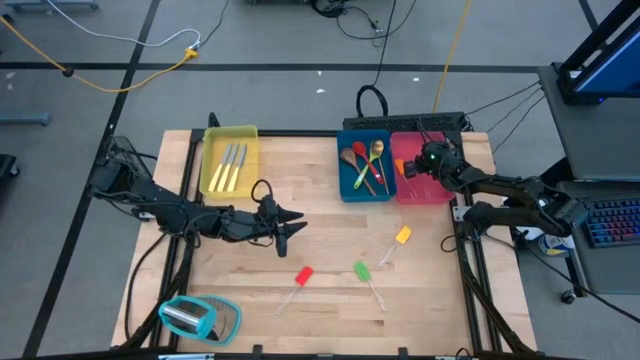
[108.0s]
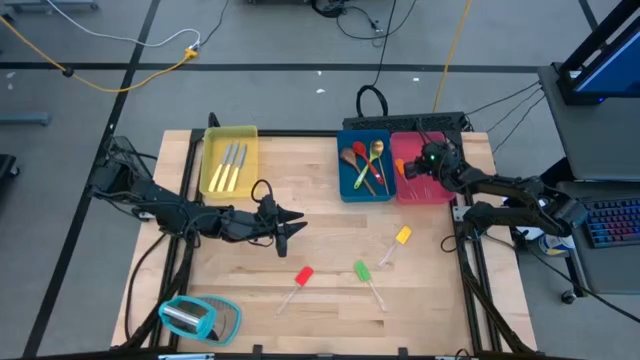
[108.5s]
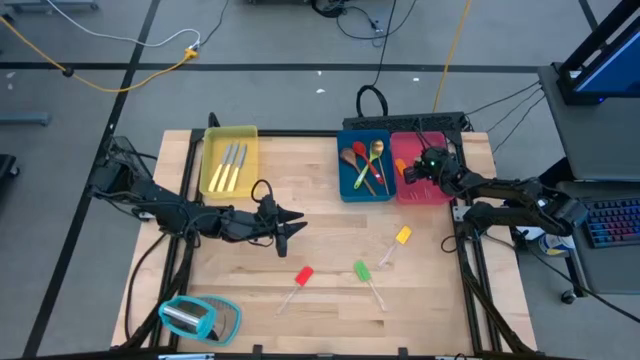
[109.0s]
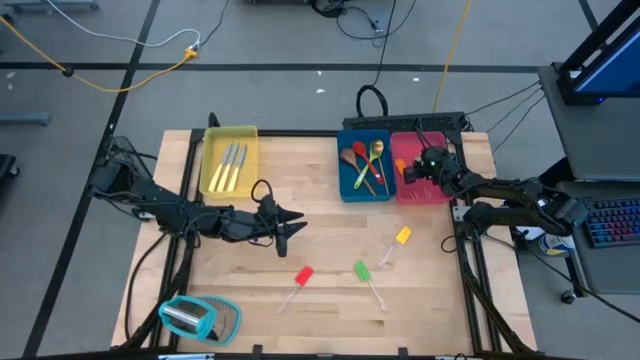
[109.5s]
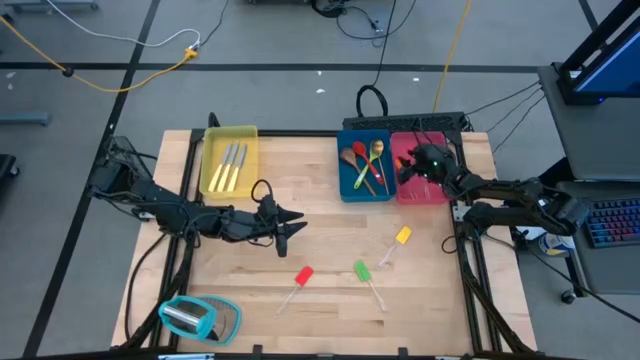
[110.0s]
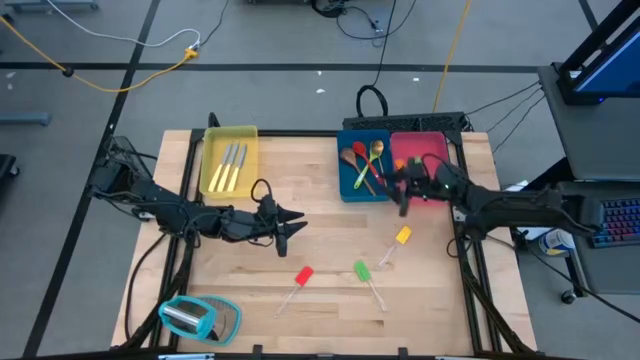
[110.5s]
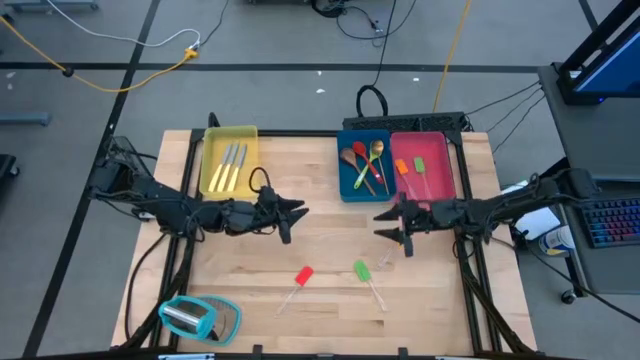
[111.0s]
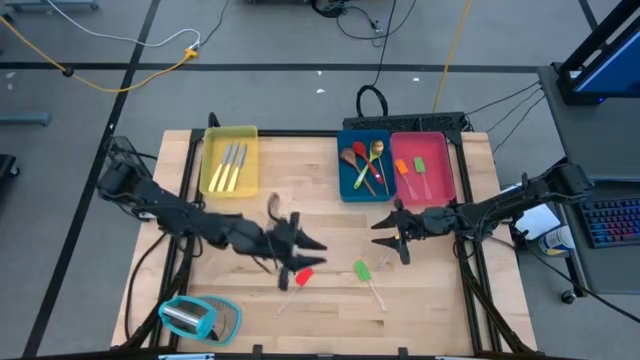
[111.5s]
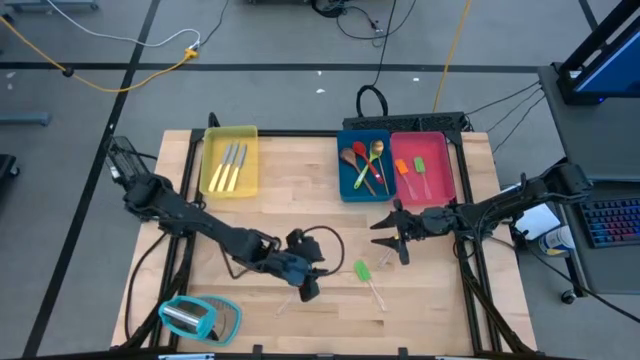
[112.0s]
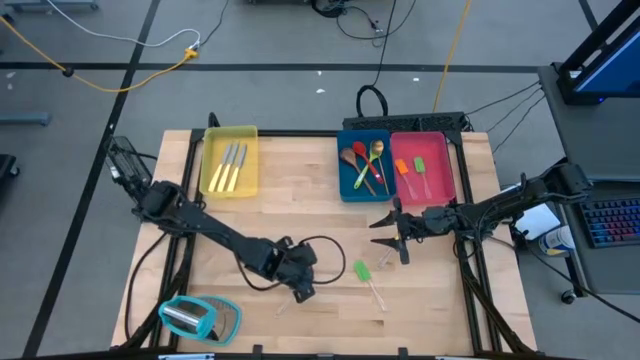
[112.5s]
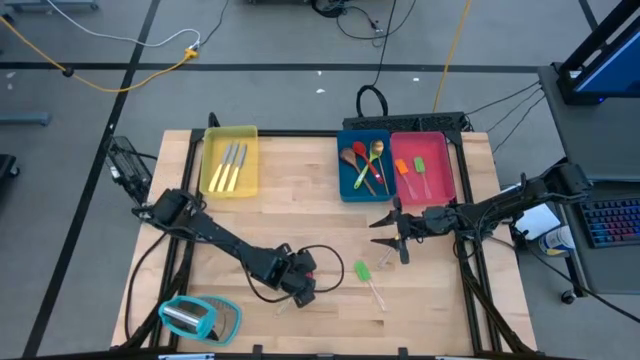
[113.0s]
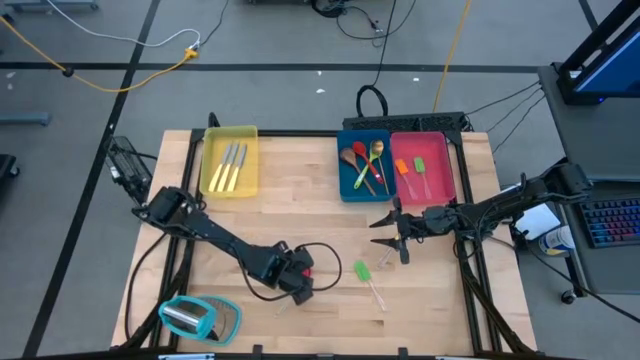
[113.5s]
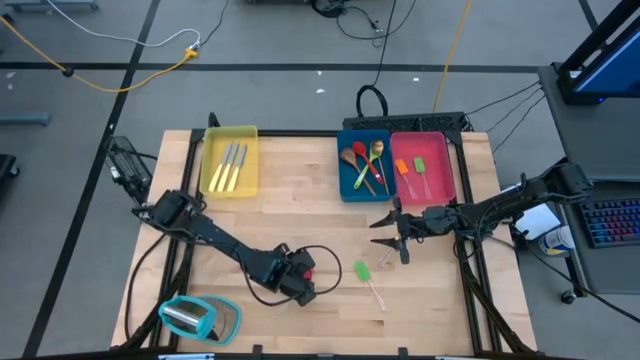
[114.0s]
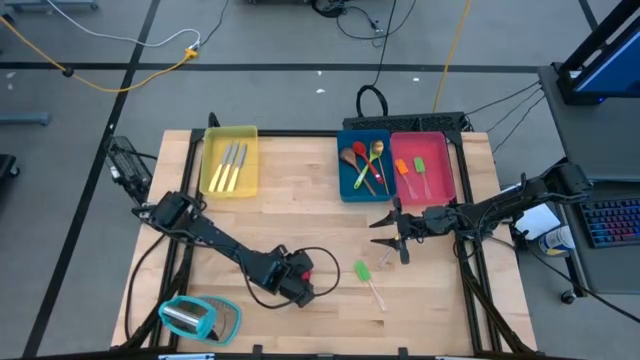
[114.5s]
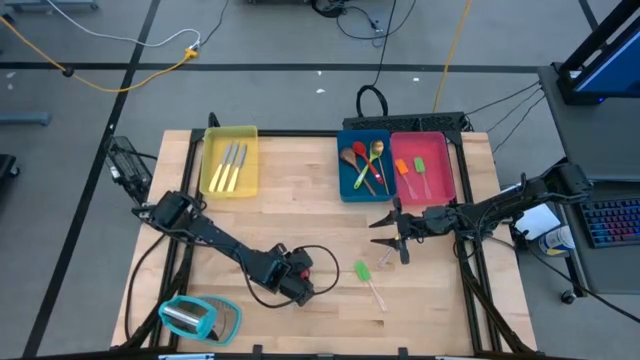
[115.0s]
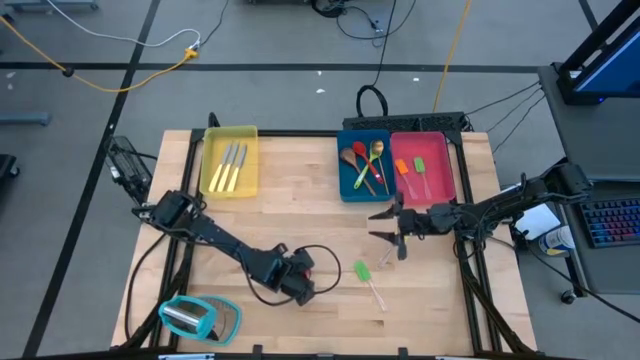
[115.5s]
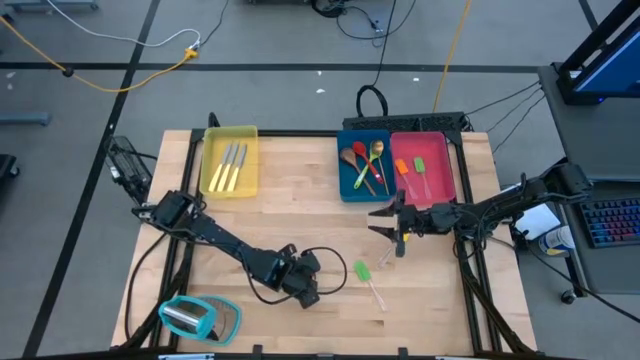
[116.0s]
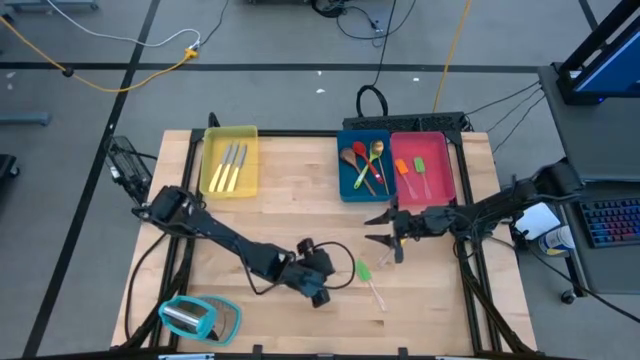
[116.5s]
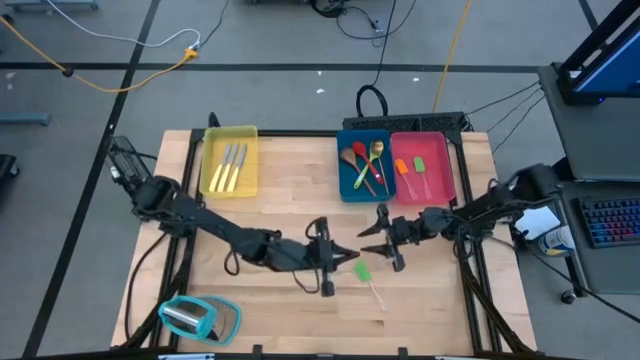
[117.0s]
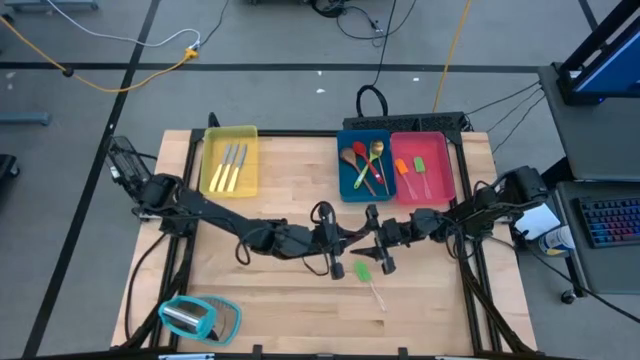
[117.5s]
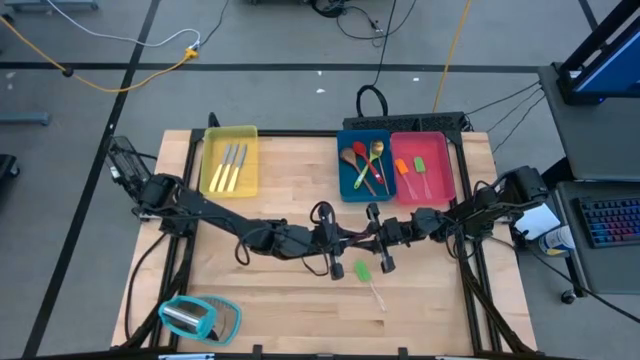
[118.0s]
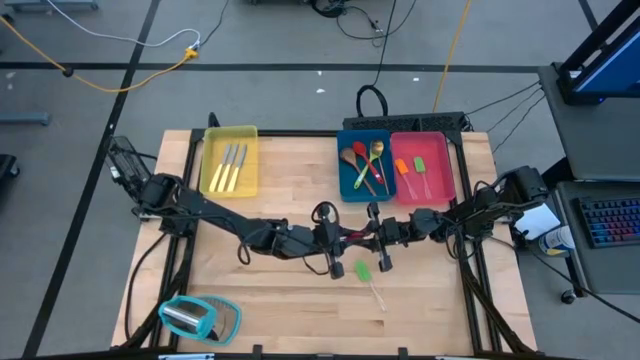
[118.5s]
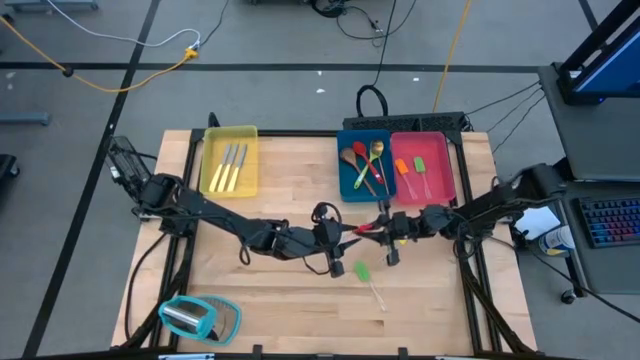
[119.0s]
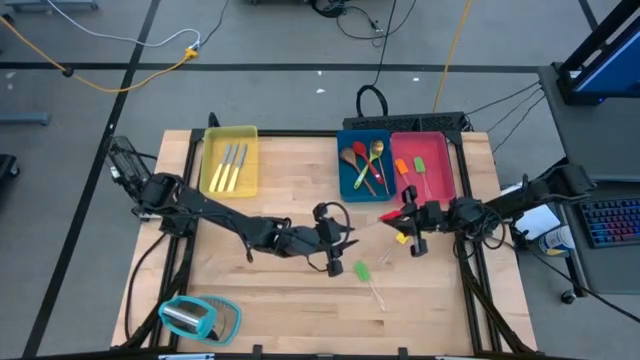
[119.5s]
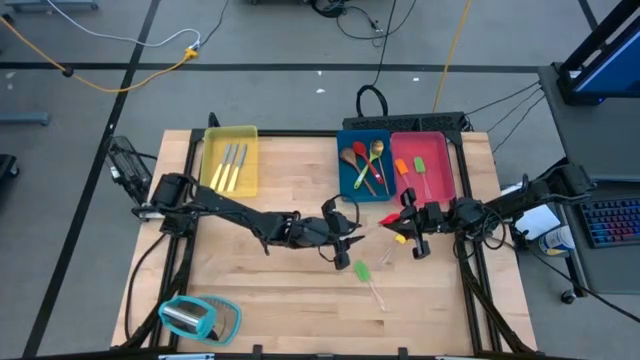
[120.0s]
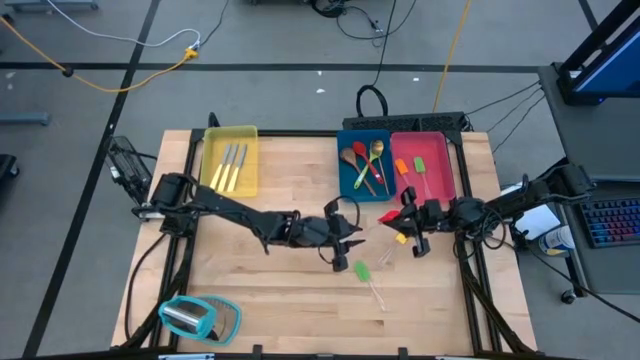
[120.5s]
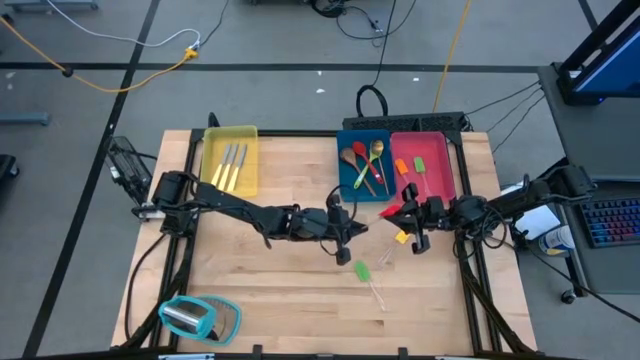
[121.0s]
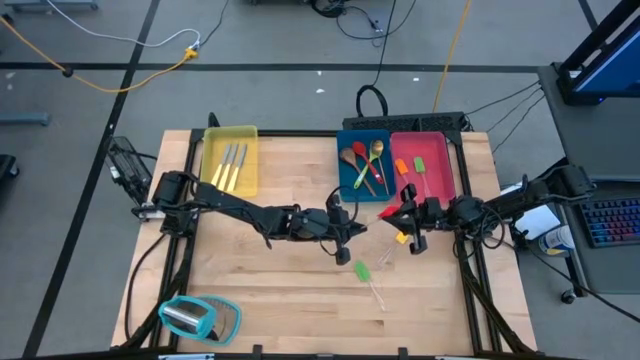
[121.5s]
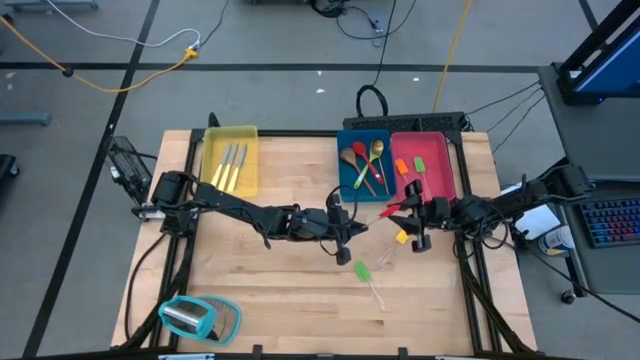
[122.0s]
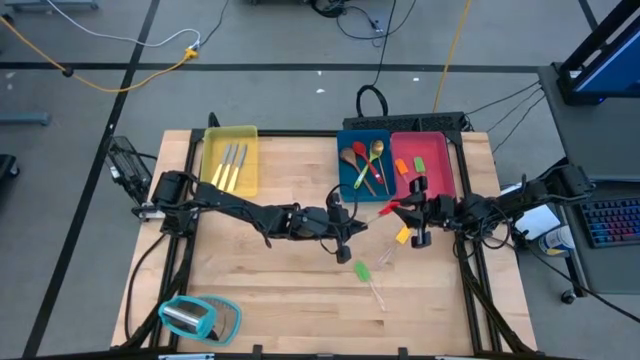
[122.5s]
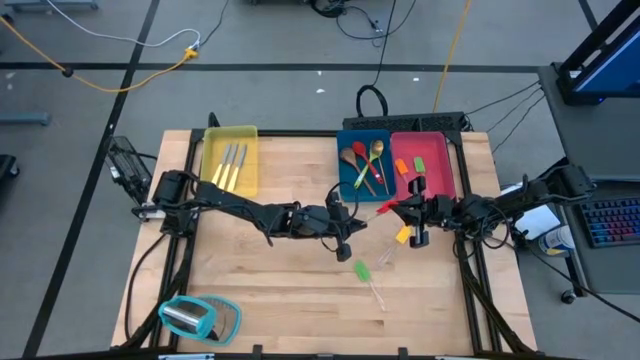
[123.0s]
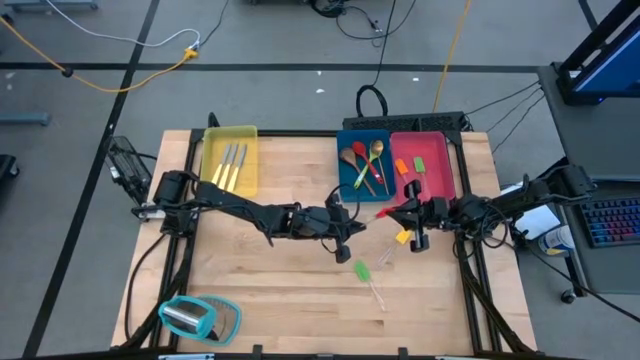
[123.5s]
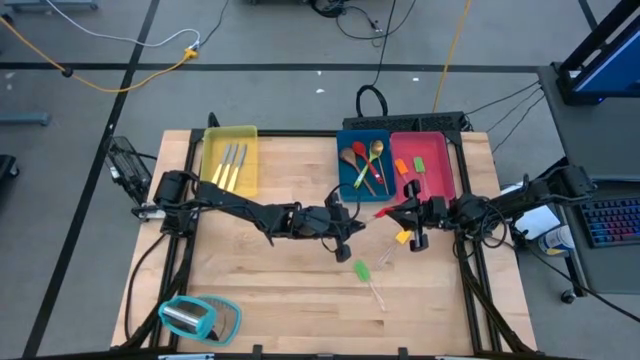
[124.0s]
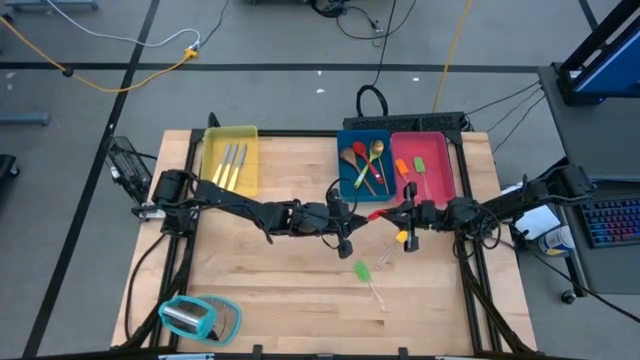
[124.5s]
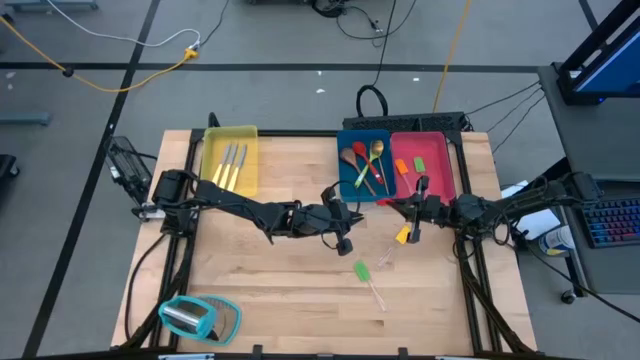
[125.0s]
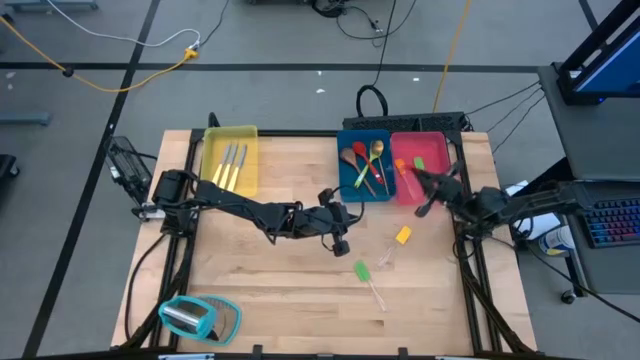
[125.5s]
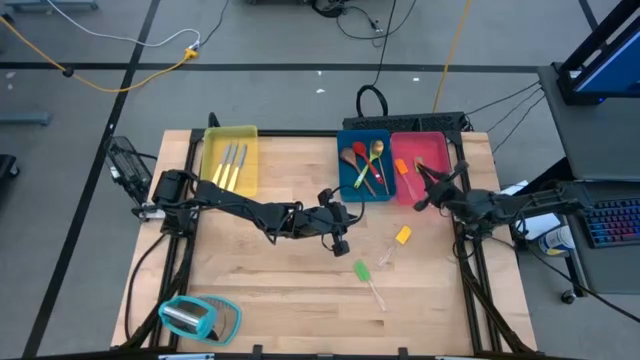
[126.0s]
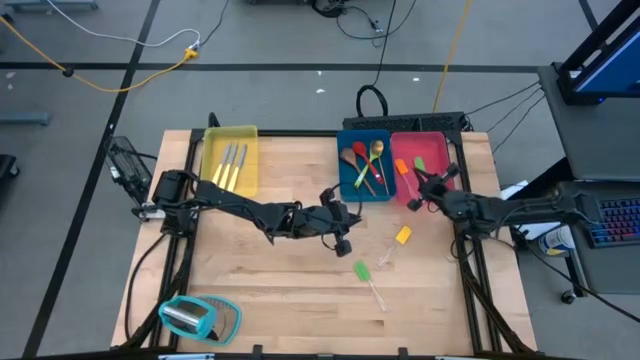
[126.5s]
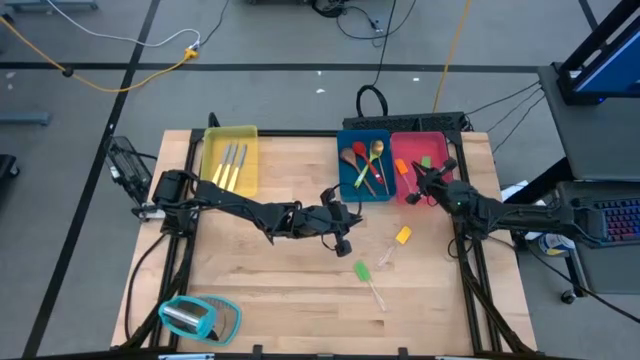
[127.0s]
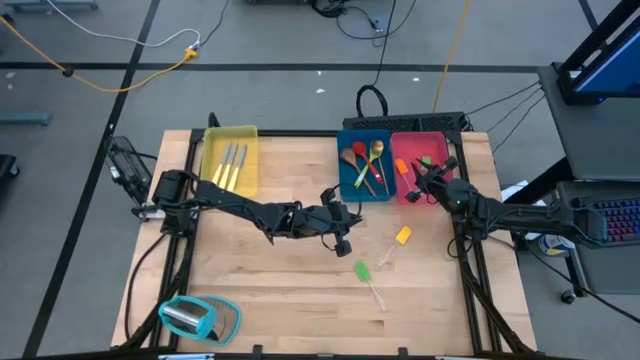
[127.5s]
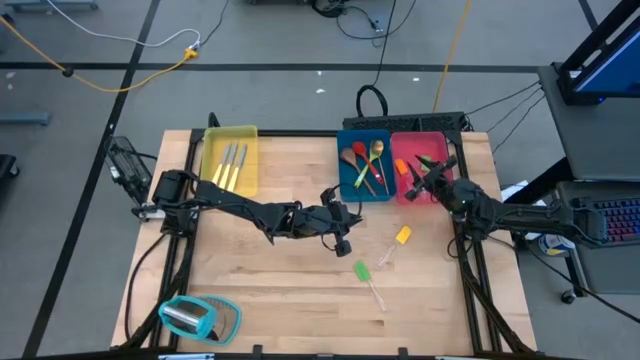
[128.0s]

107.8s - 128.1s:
Task: Pick & Place Kitchen Items
Put the red spatula into the pink bin

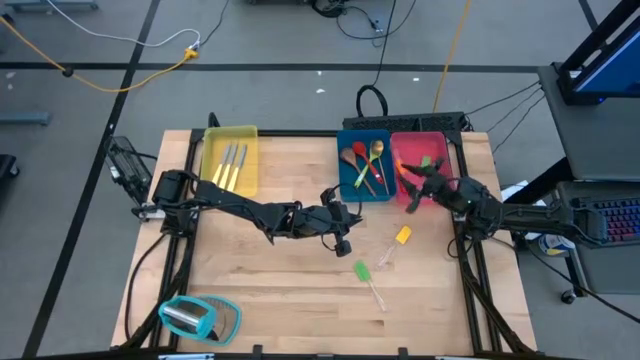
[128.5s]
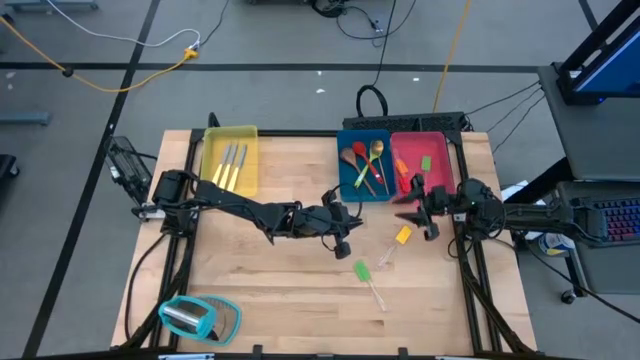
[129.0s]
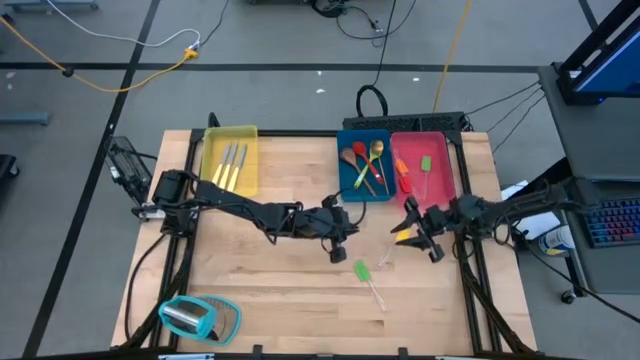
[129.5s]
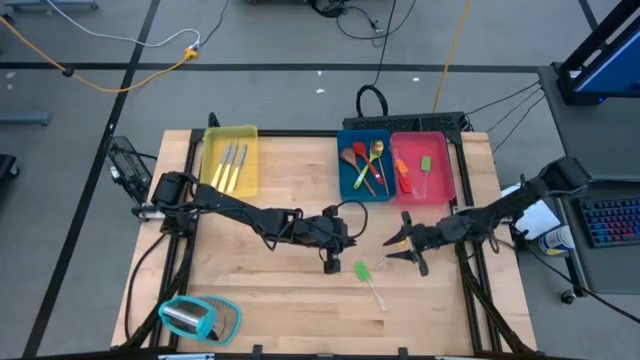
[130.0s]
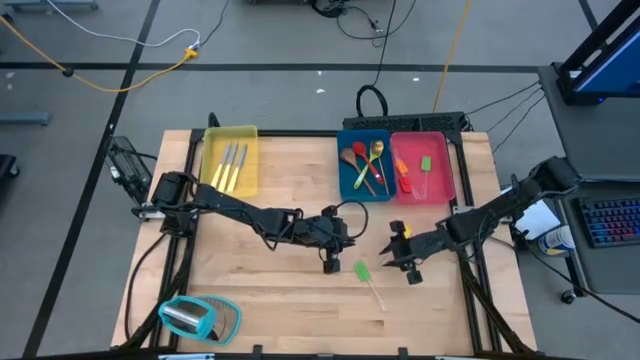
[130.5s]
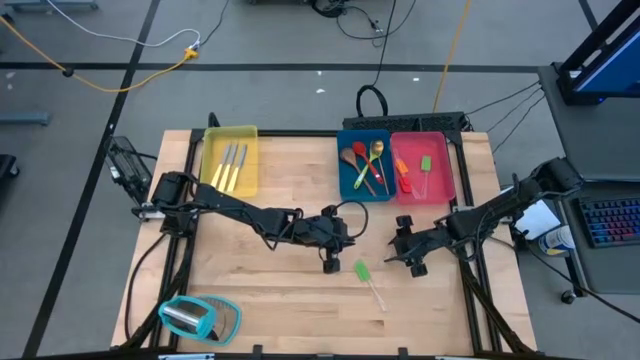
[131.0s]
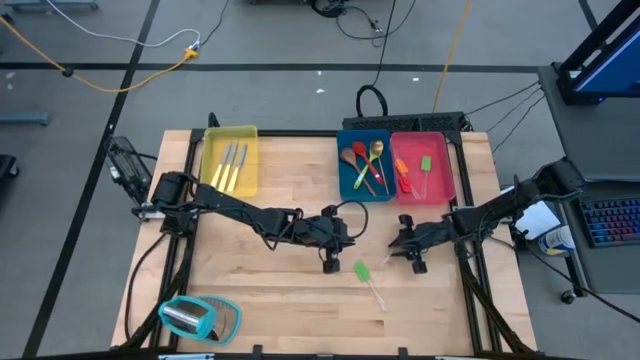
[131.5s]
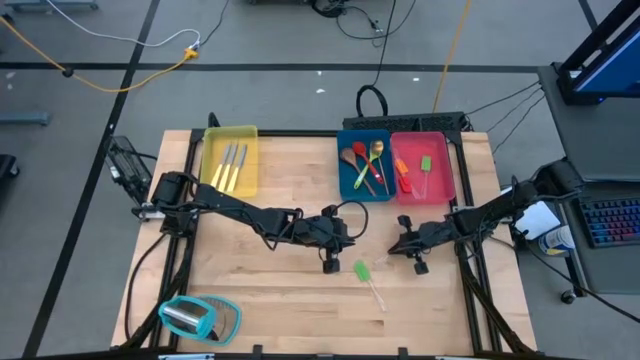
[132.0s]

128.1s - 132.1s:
Put the yellow spatula into the pink bin
